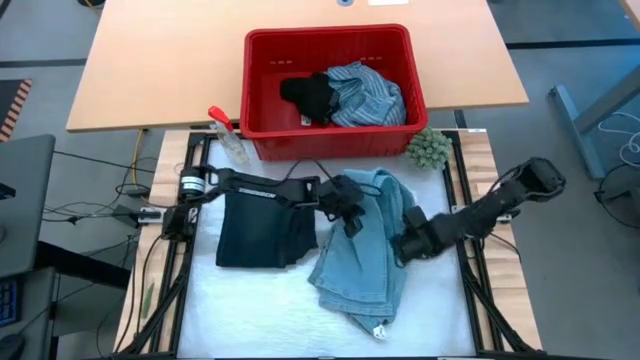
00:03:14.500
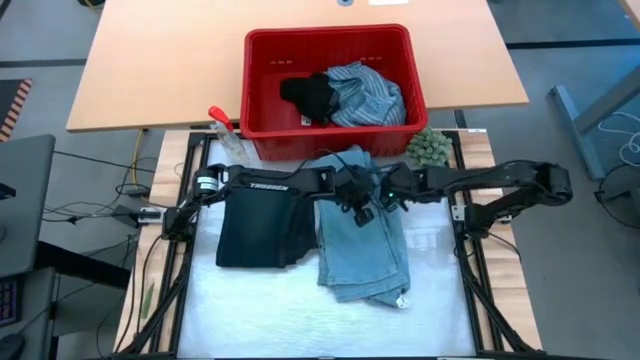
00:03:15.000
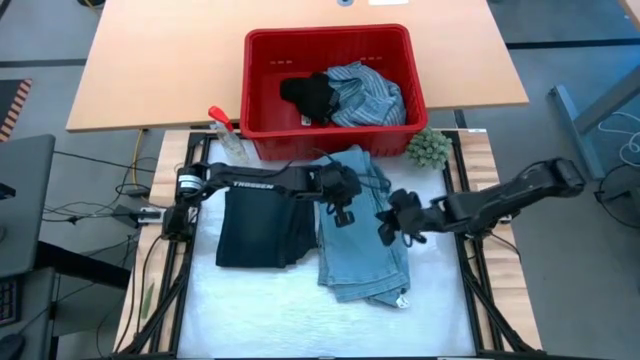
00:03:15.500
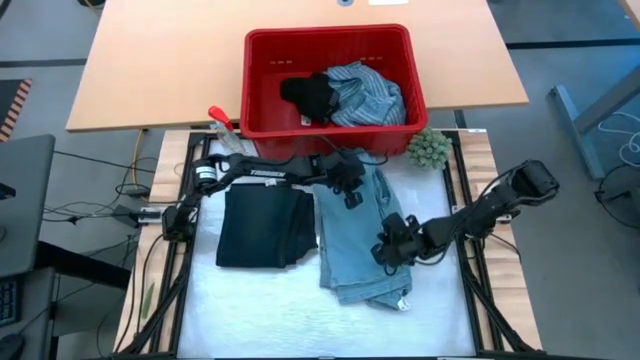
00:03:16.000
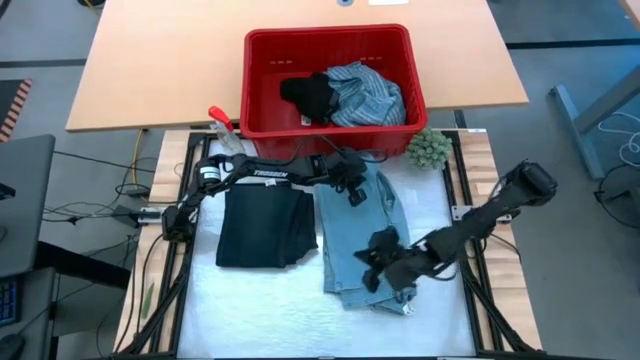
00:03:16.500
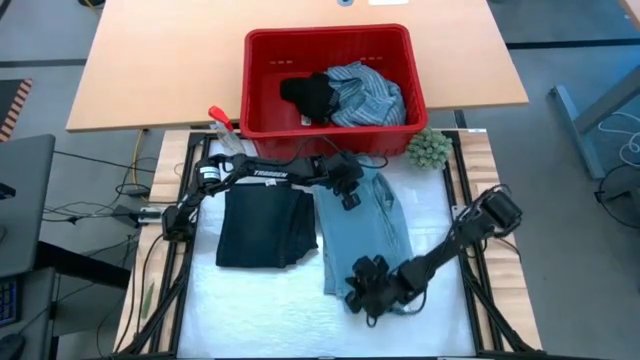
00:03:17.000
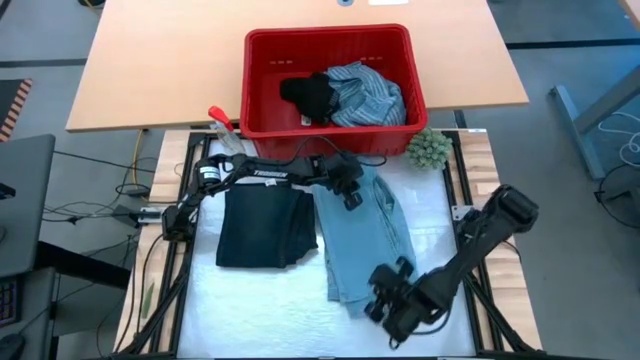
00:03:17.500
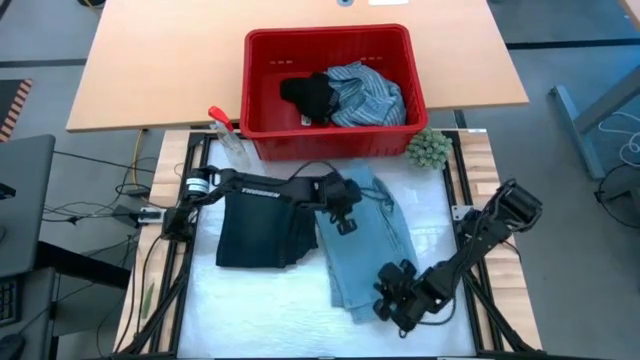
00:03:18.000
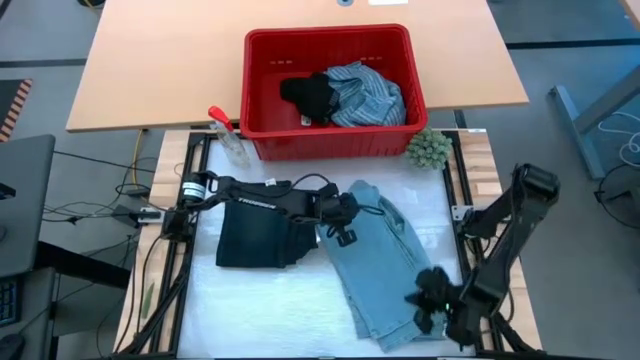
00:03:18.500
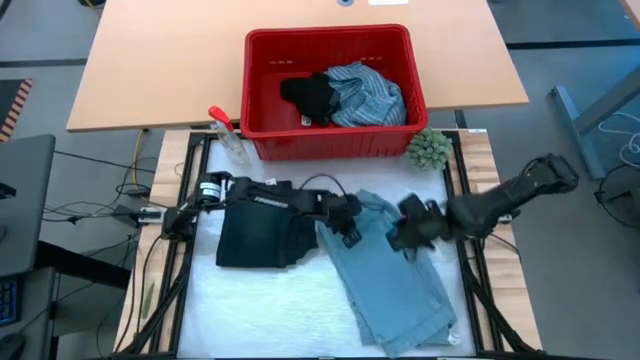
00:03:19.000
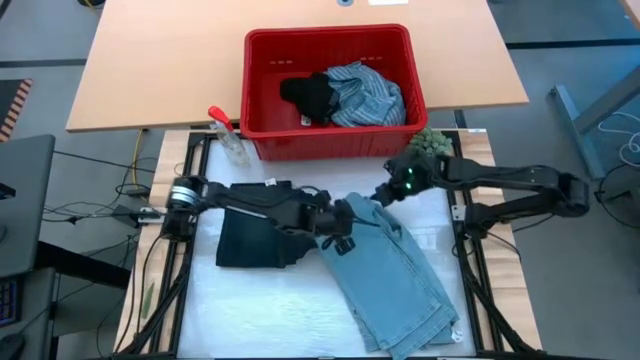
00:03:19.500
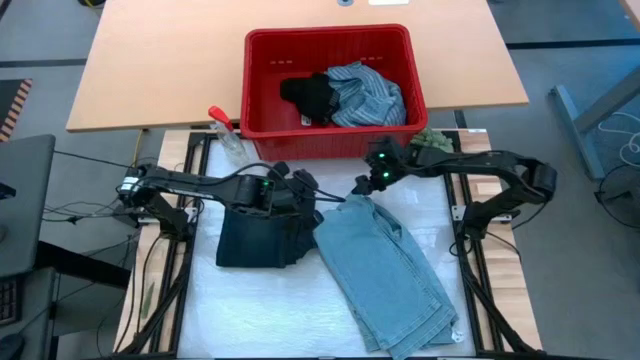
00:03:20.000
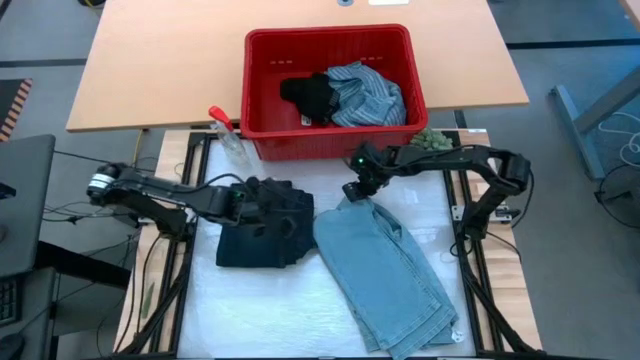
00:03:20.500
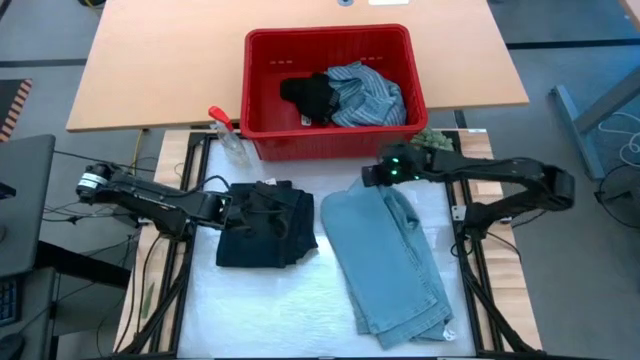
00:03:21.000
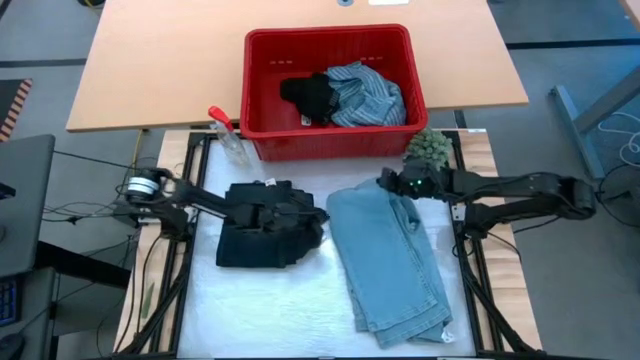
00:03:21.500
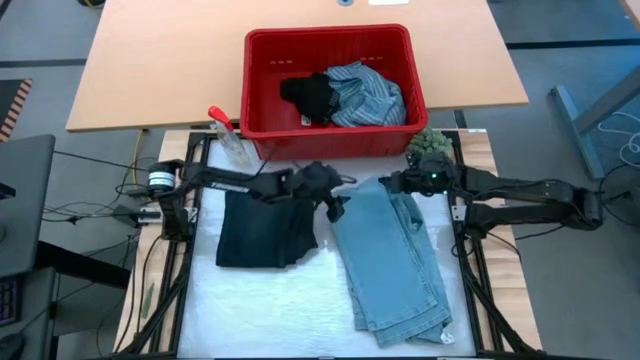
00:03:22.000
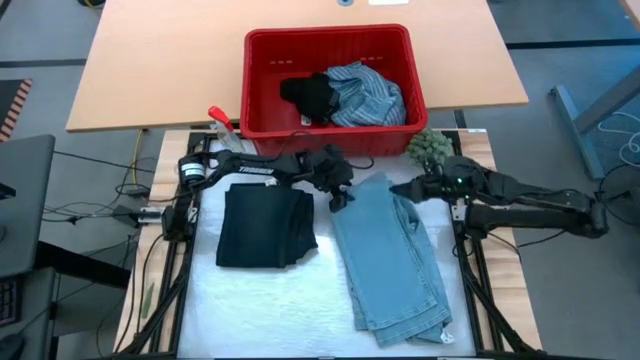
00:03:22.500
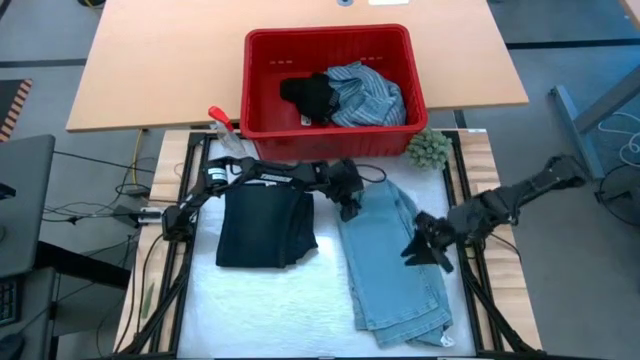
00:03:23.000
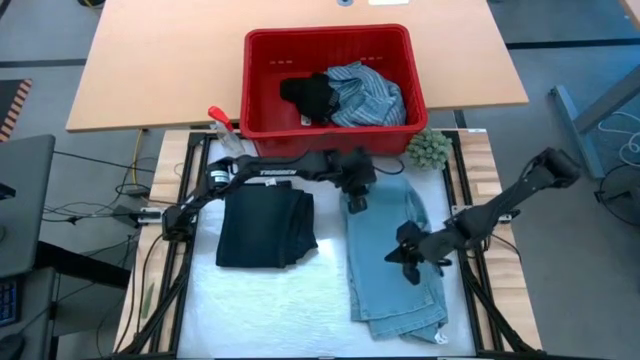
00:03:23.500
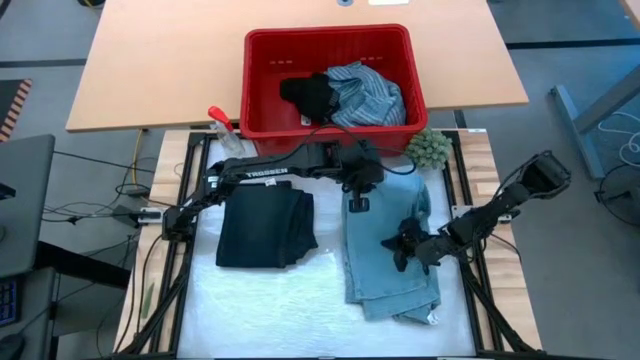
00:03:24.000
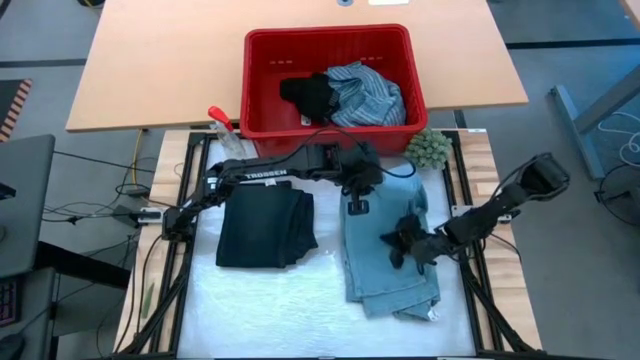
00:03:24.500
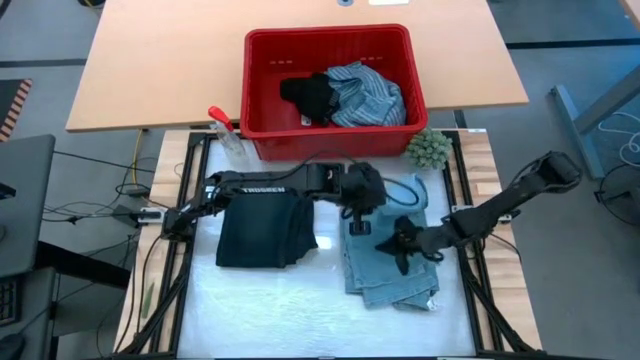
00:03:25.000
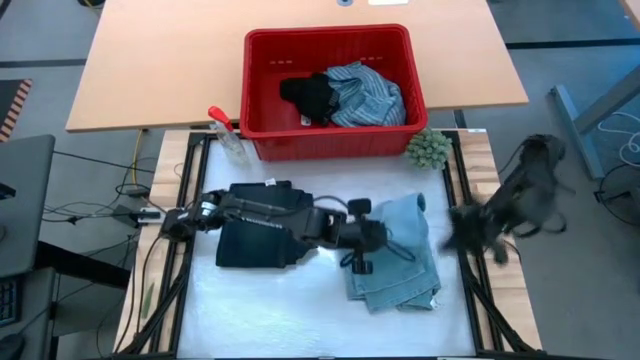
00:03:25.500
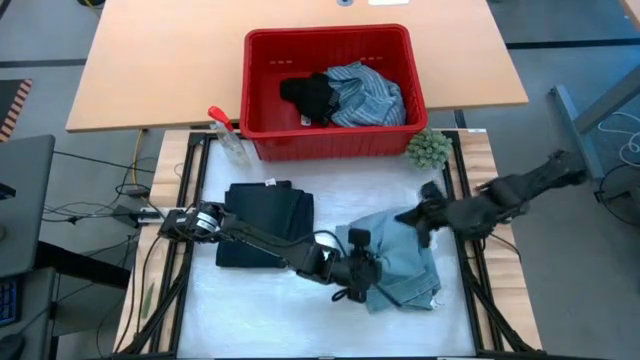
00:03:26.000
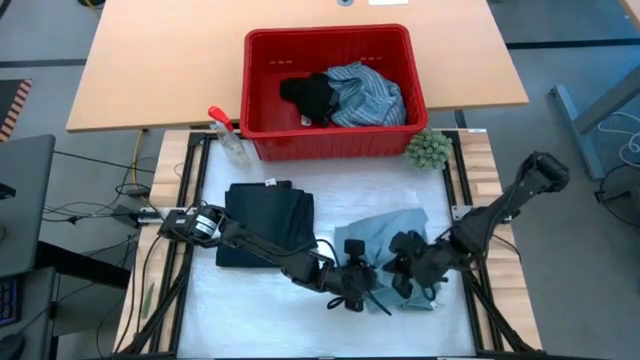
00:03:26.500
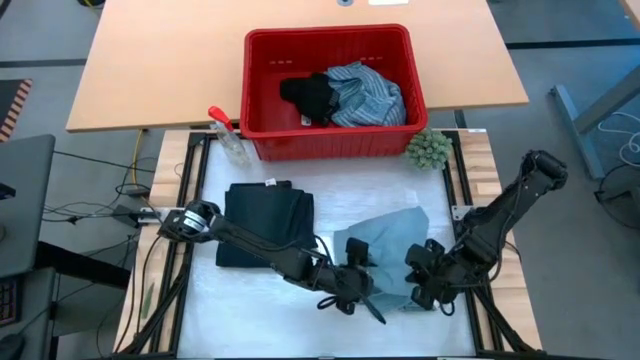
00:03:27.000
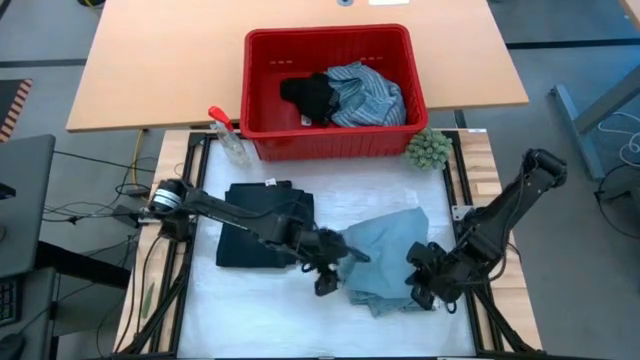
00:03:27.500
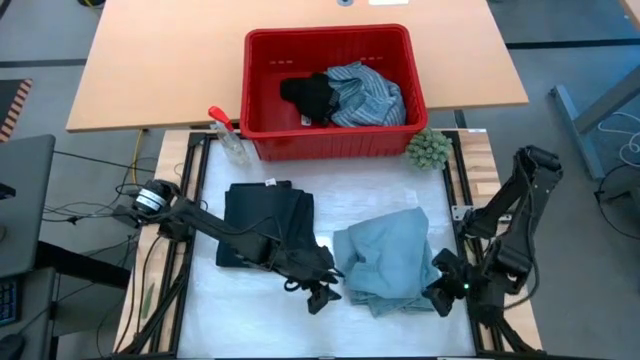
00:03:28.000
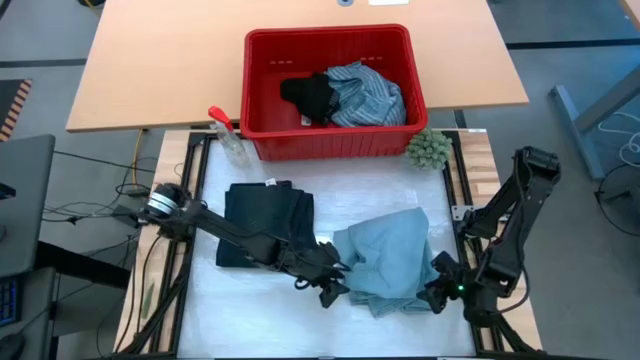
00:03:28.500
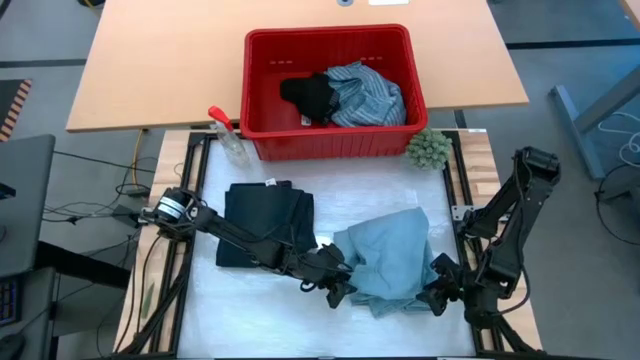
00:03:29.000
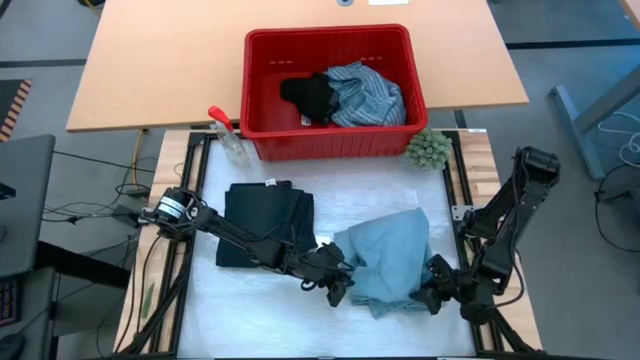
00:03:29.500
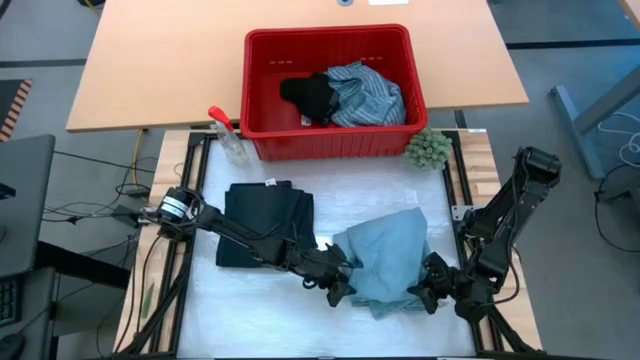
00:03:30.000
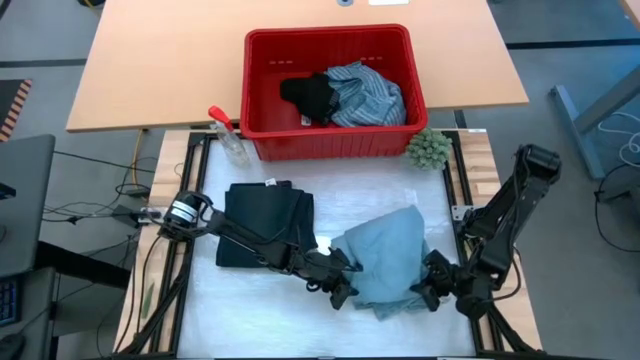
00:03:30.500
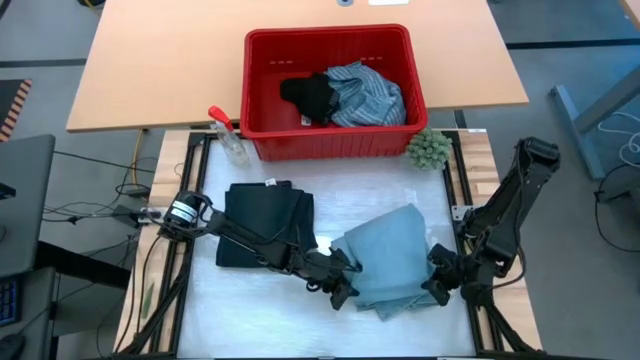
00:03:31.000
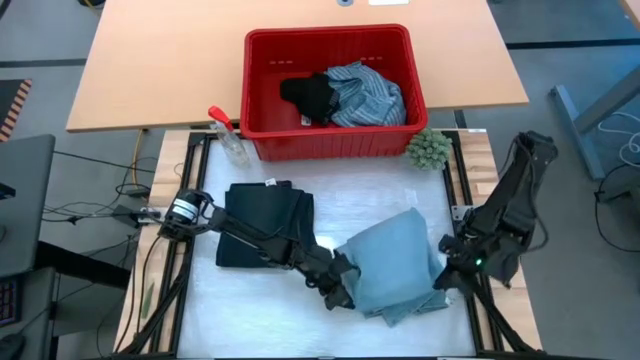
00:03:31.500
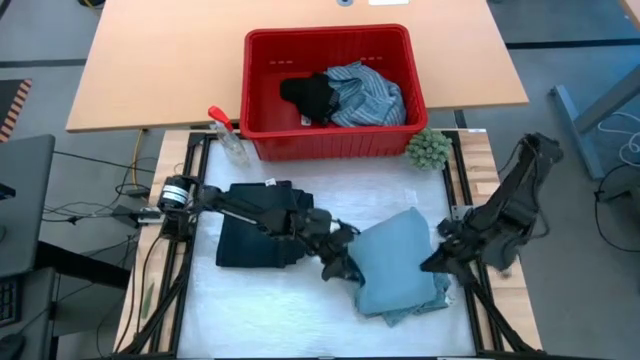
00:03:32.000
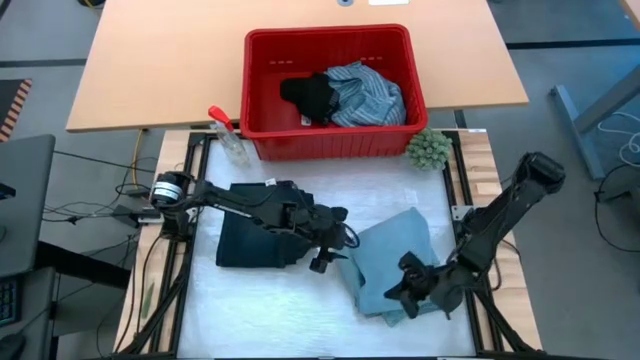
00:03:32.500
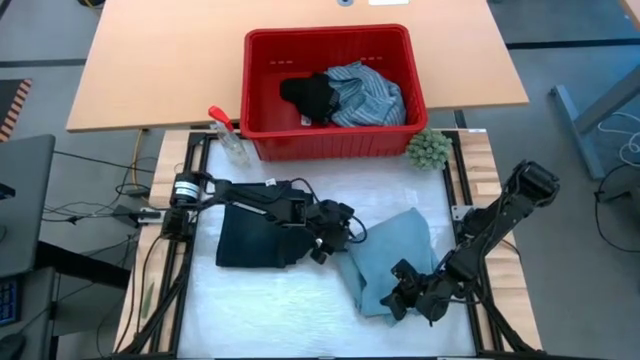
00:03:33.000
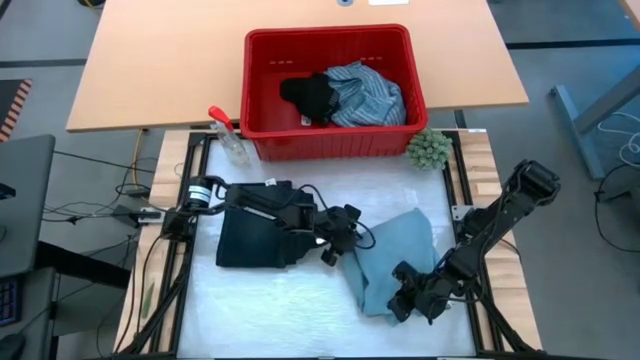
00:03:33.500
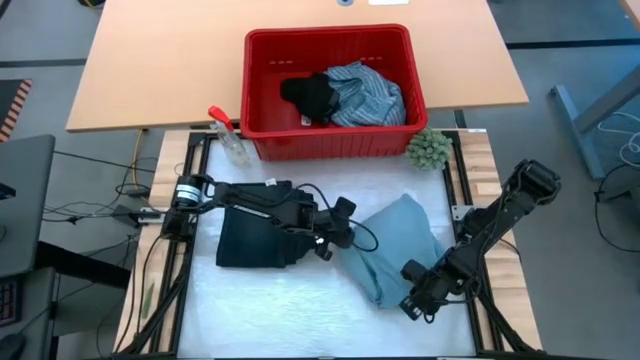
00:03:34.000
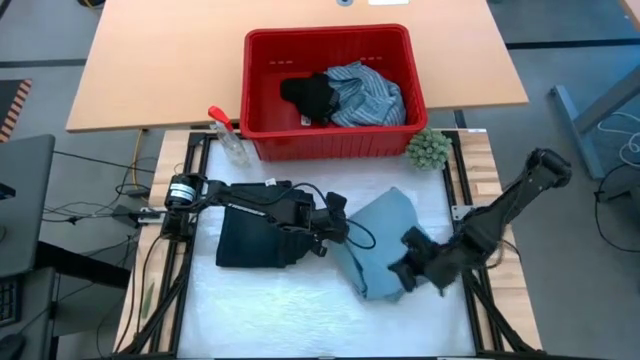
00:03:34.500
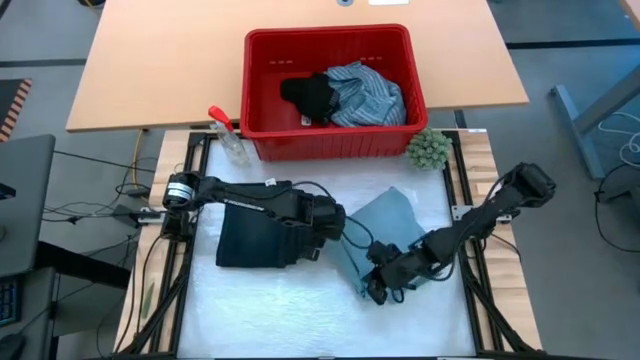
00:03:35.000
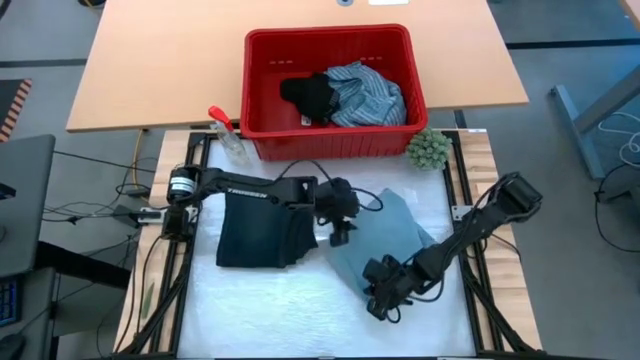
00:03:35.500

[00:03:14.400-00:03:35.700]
Task: Fold Laundry from Bin
Fold the light blue pants
